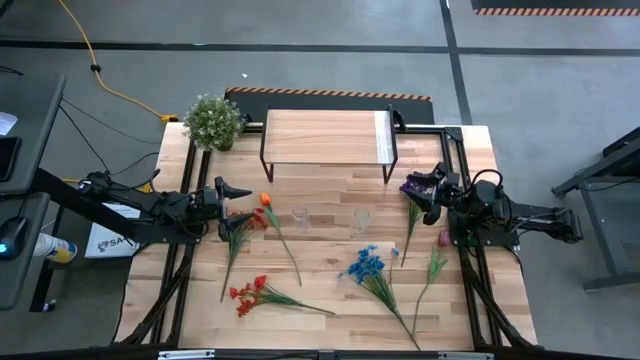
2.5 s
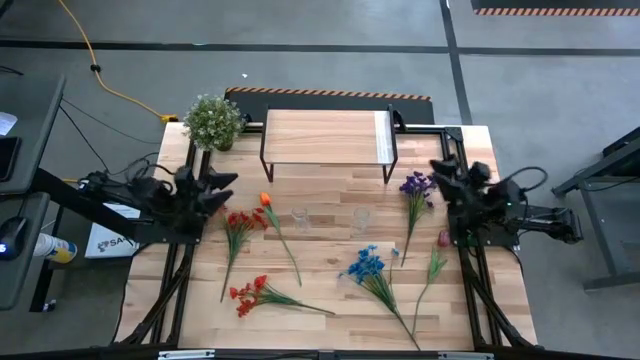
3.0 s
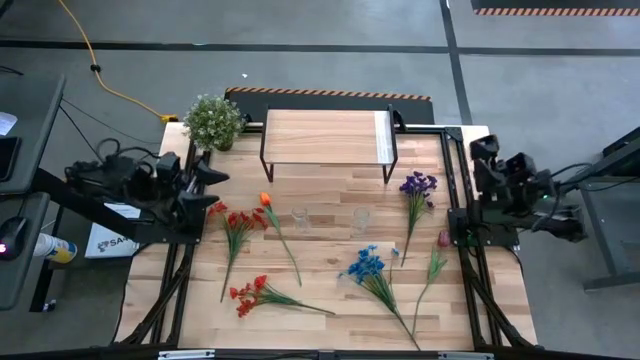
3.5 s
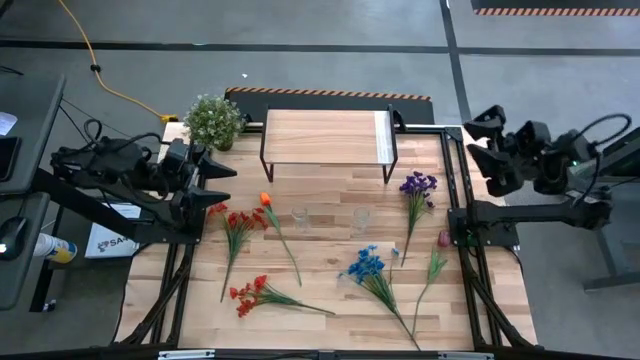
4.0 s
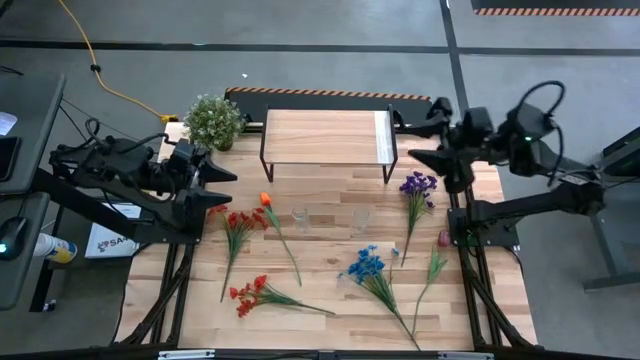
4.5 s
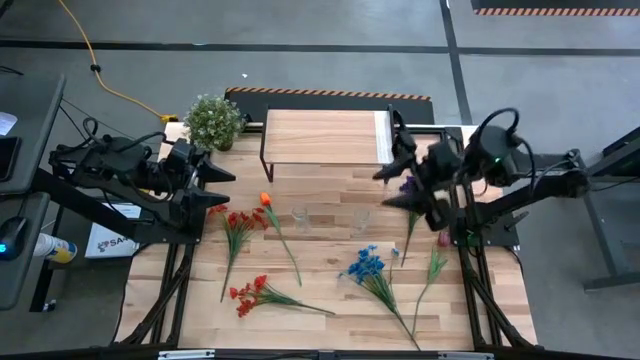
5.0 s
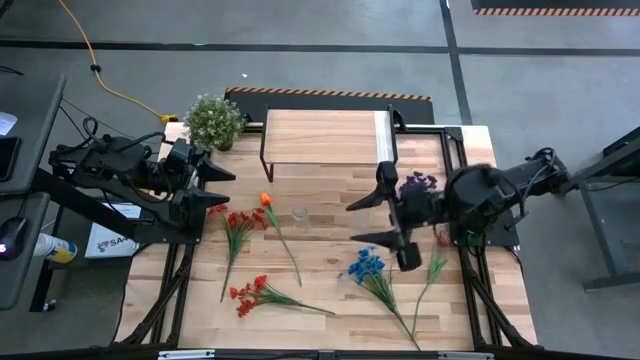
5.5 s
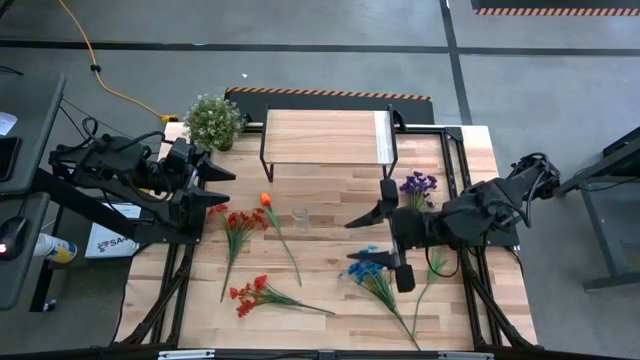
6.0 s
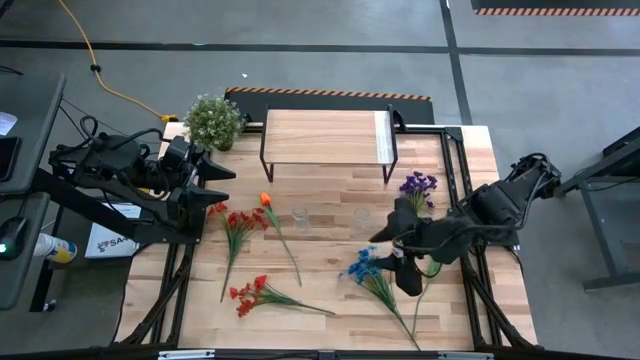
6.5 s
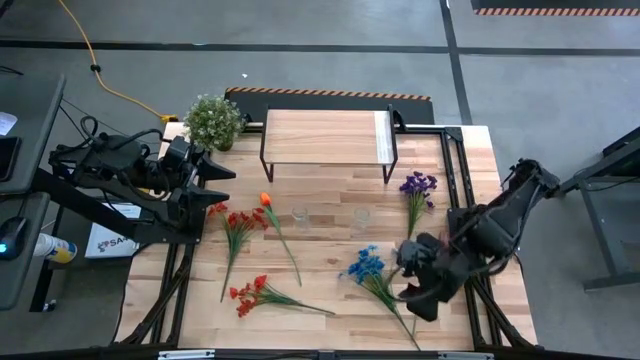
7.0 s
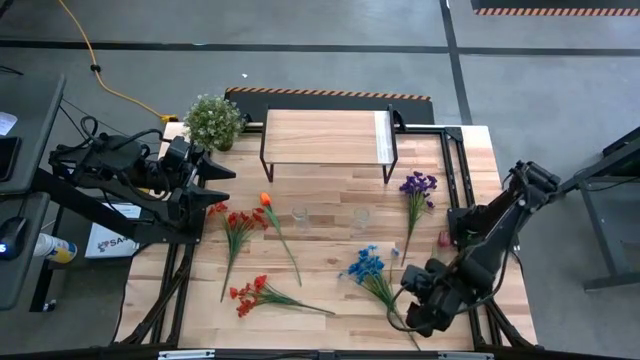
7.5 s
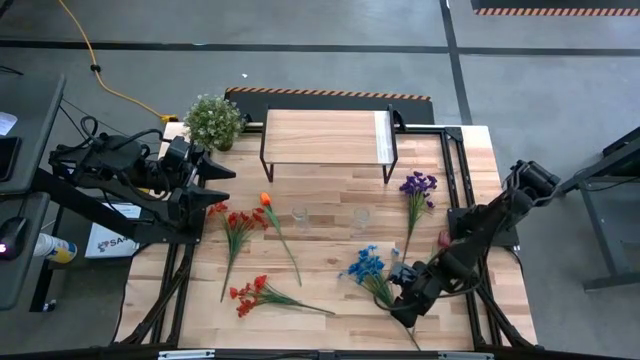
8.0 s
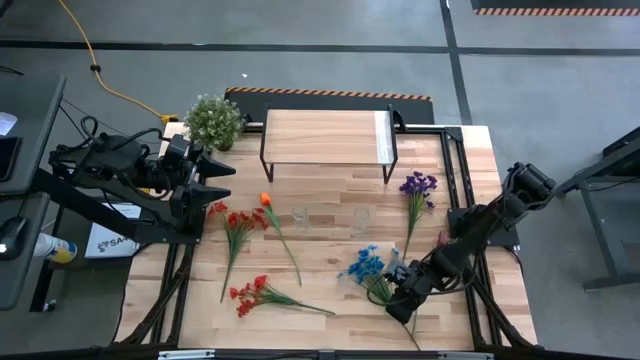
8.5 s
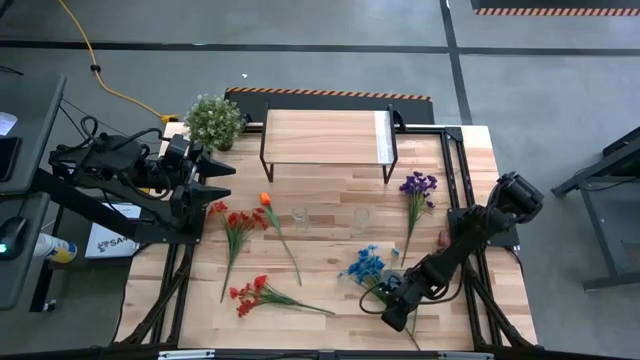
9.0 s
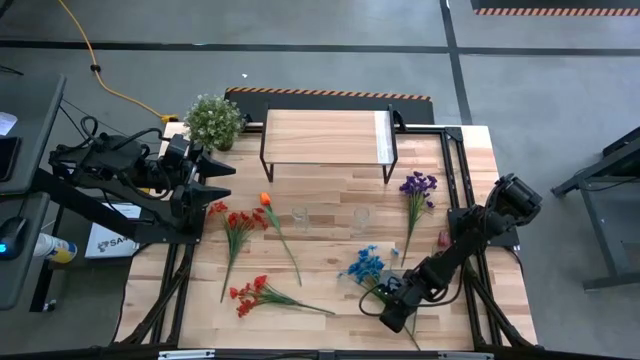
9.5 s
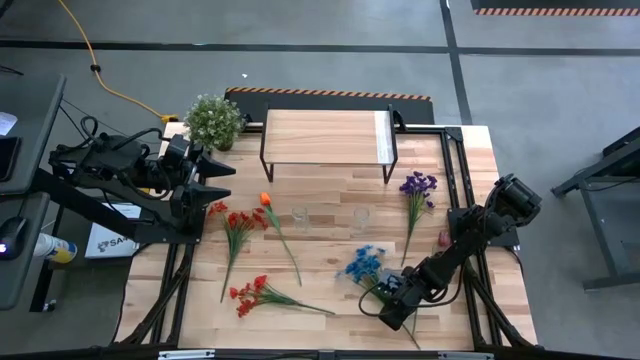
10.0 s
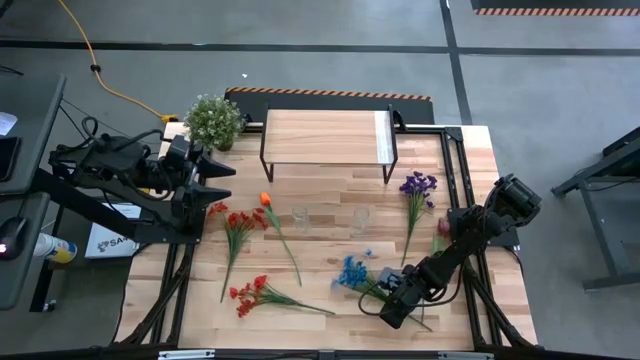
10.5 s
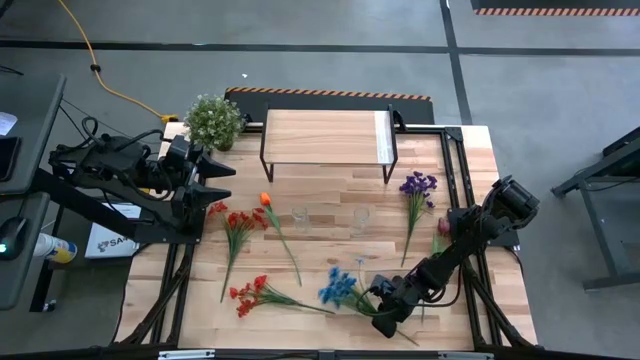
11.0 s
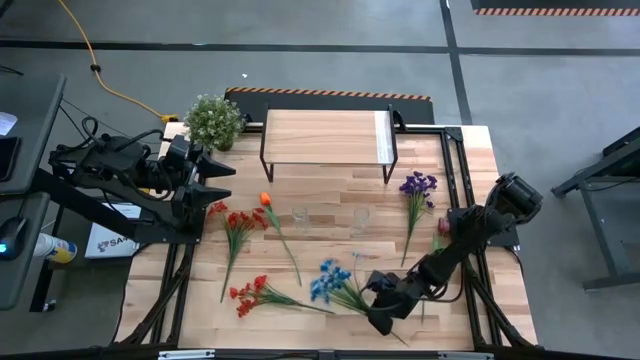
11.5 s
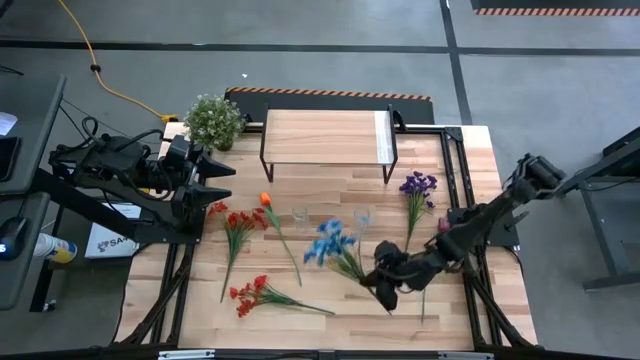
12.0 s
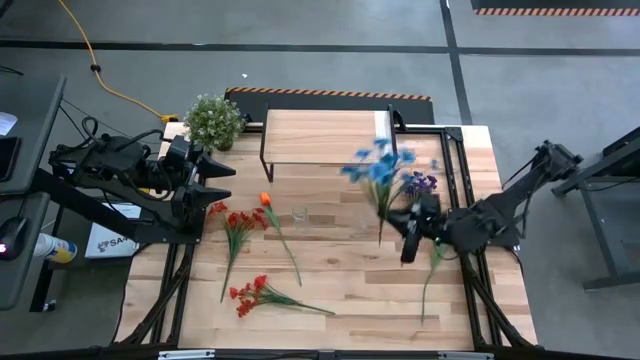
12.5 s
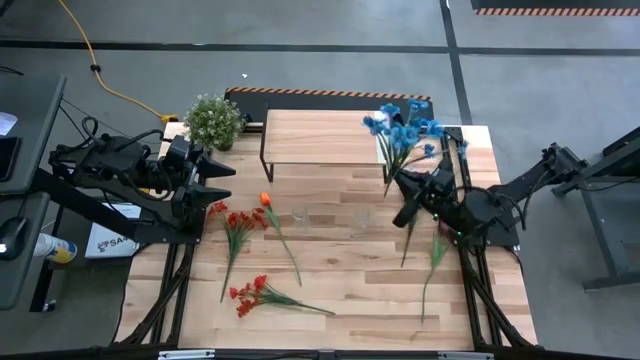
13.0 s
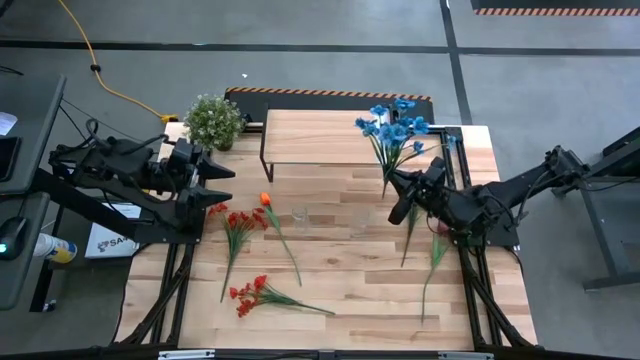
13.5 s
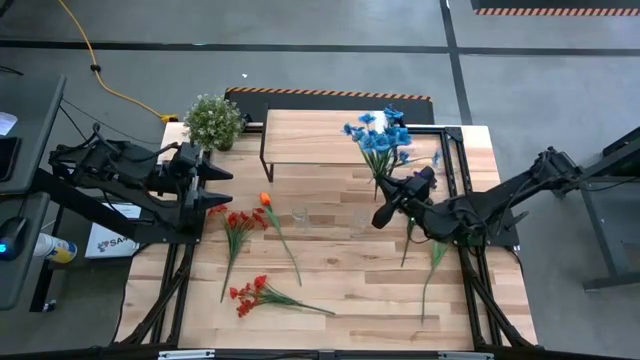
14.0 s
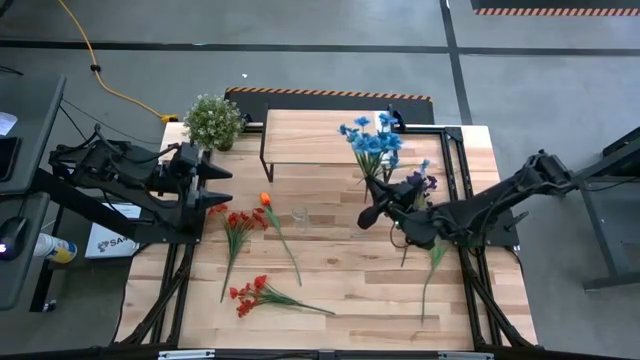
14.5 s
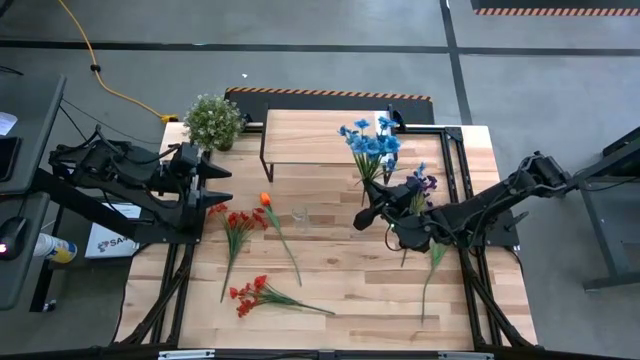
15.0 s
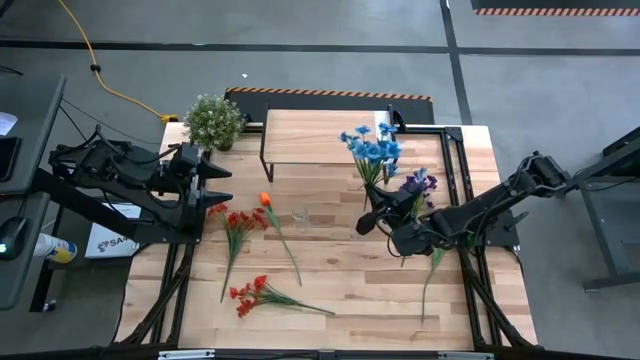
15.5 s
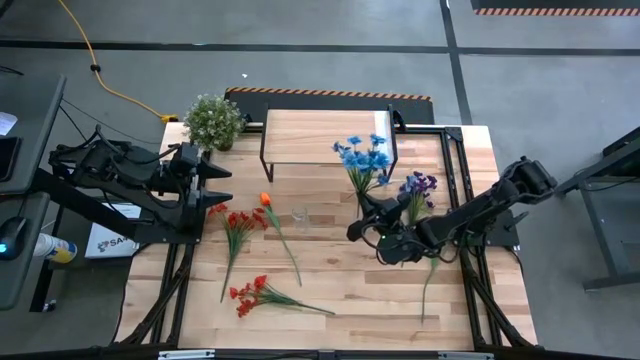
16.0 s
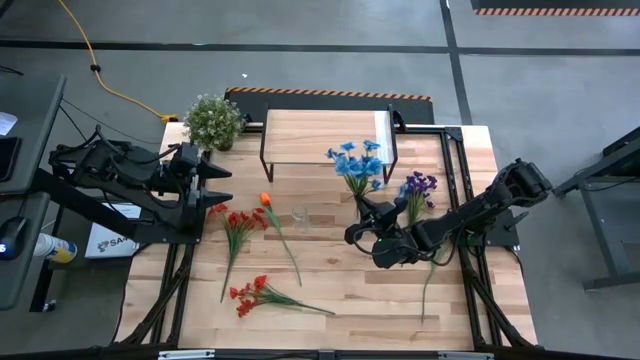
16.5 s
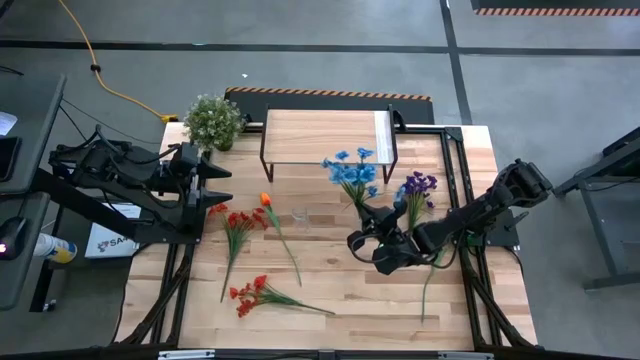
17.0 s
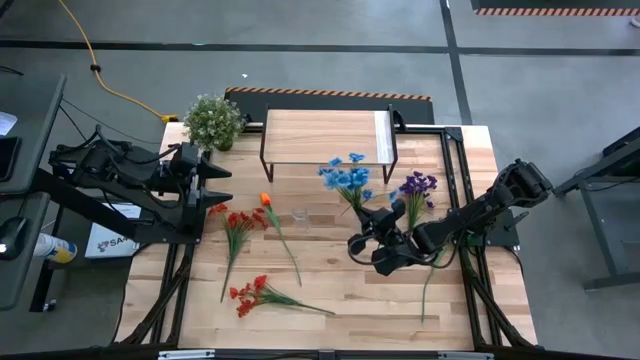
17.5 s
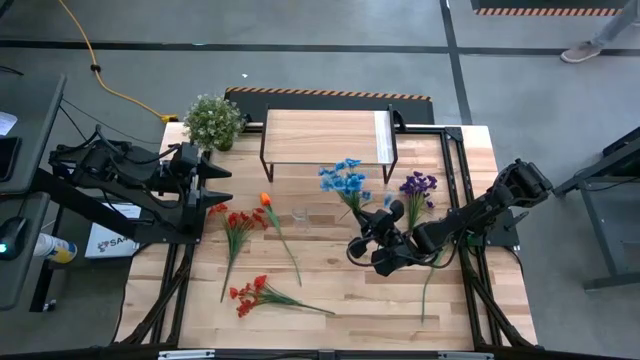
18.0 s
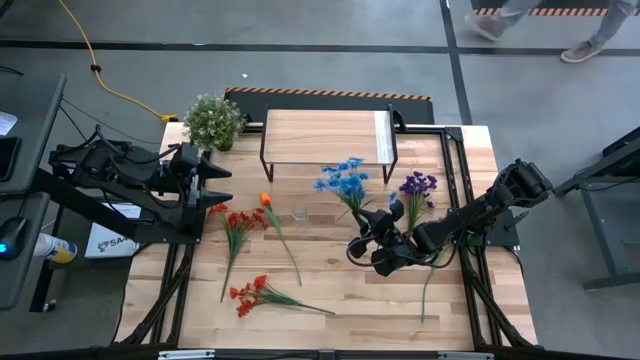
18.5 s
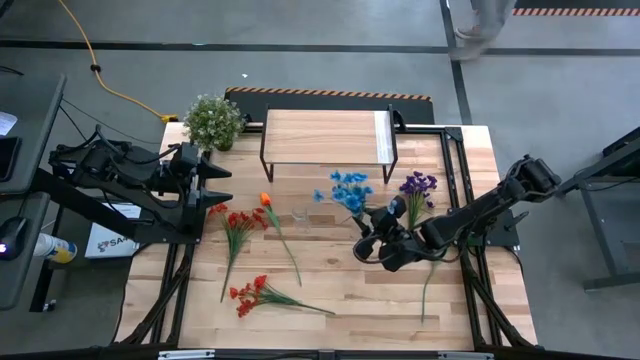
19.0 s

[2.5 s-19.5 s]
Task: Pick and place flowers into a vace then onto a shelf
Put the blue flowers into the right transparent vase

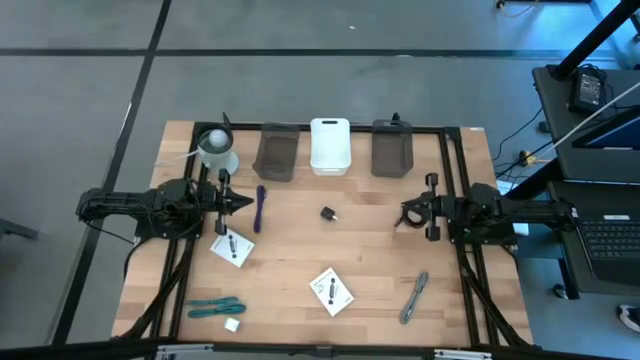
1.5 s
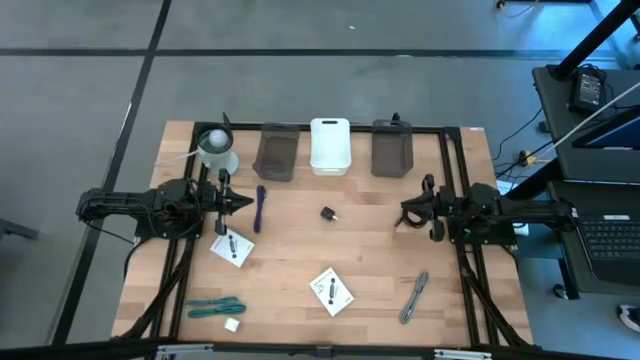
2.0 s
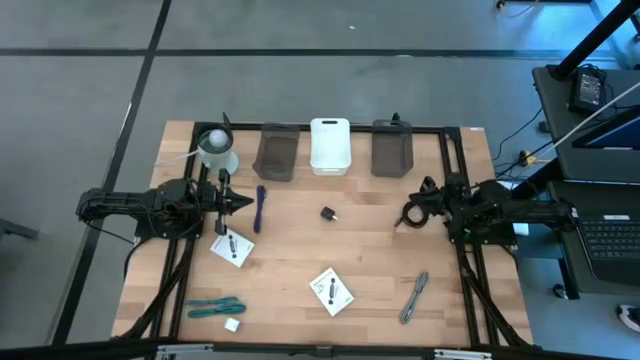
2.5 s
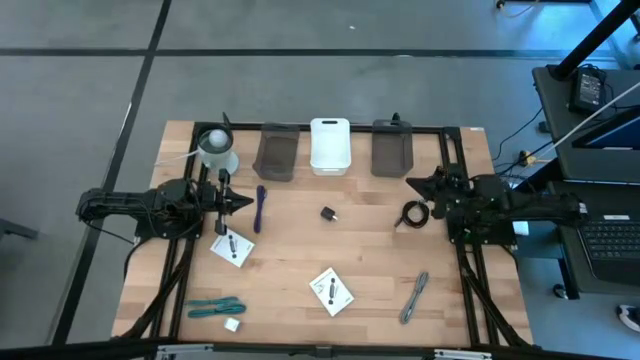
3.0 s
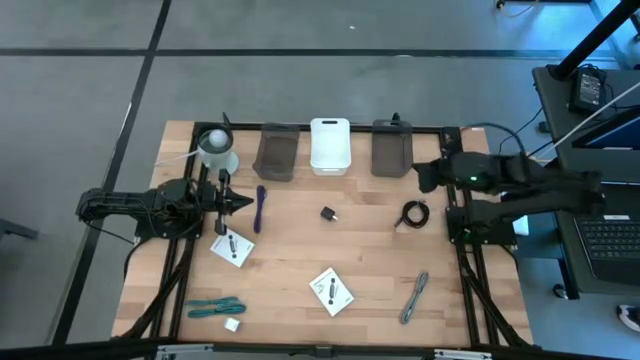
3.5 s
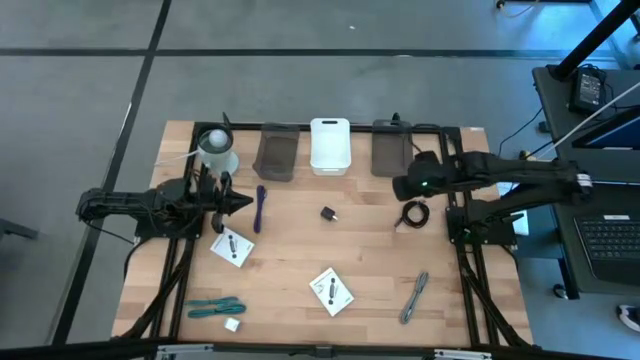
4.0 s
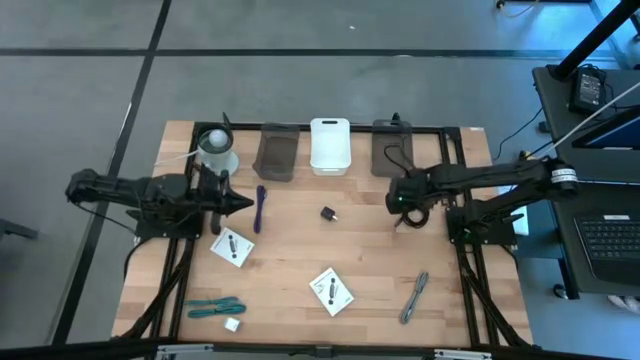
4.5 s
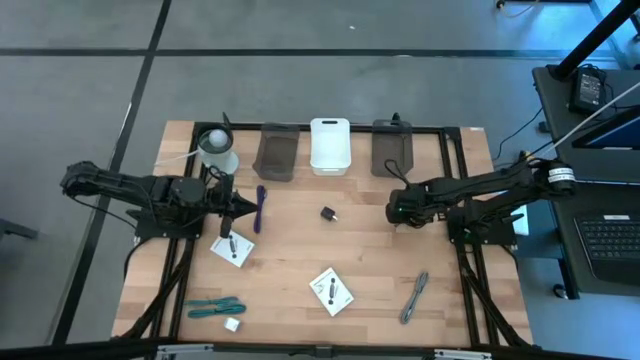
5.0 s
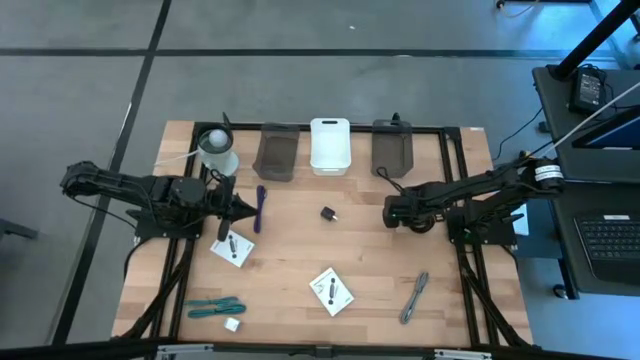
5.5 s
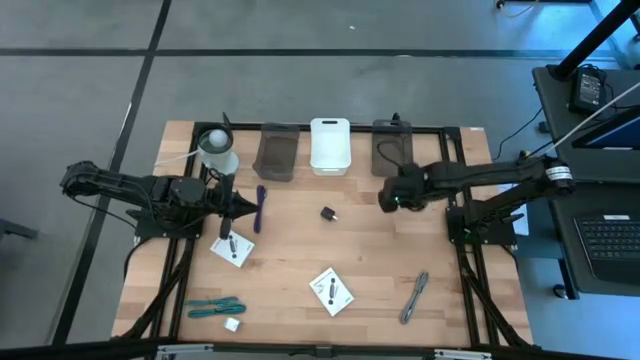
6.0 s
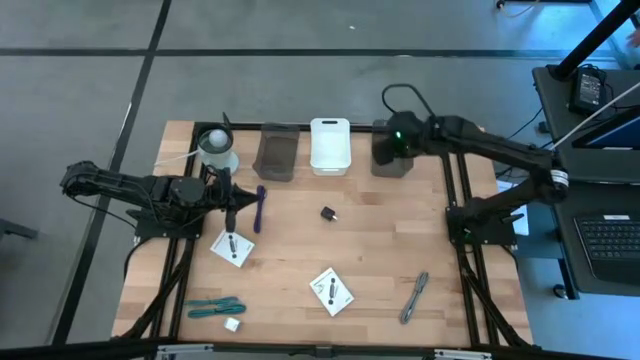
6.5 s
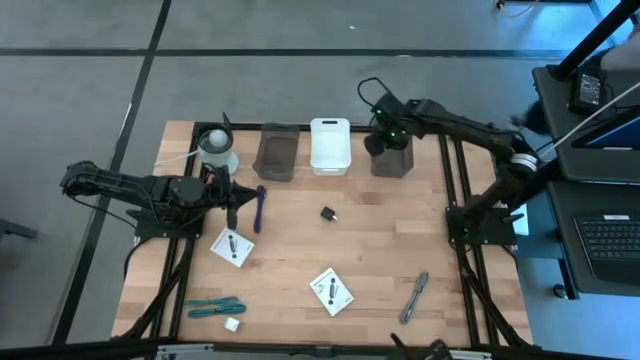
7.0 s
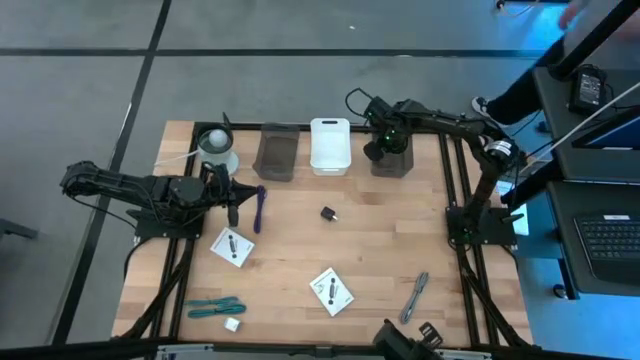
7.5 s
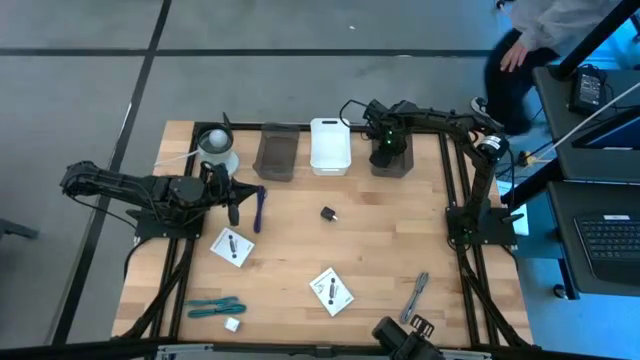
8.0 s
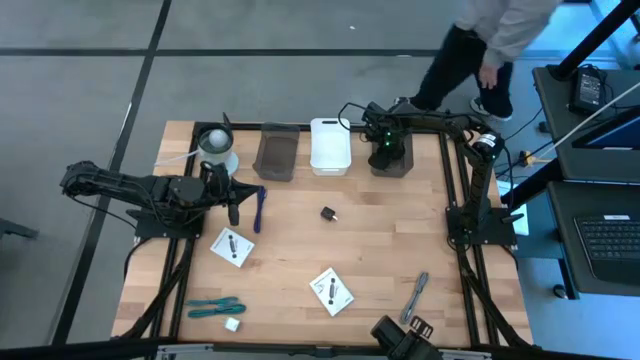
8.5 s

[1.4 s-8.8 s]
Task: Pick and place items into bin
Put the black charger cable into the right black bin
